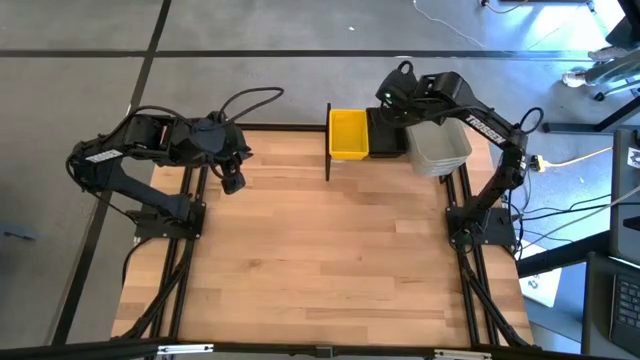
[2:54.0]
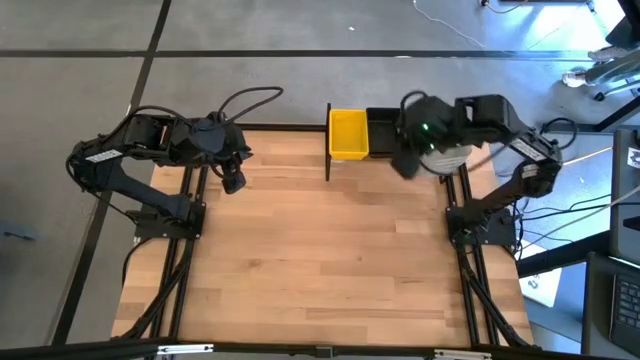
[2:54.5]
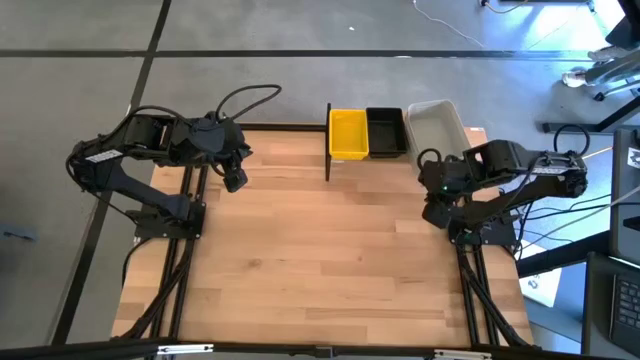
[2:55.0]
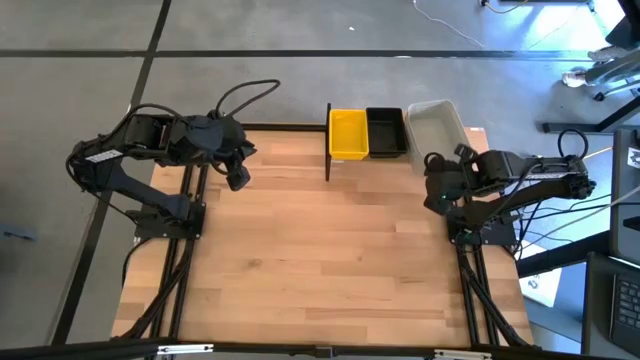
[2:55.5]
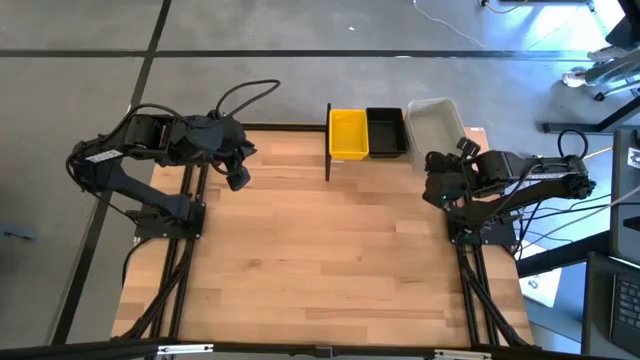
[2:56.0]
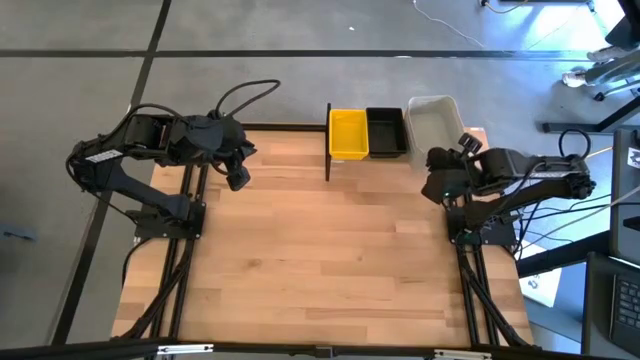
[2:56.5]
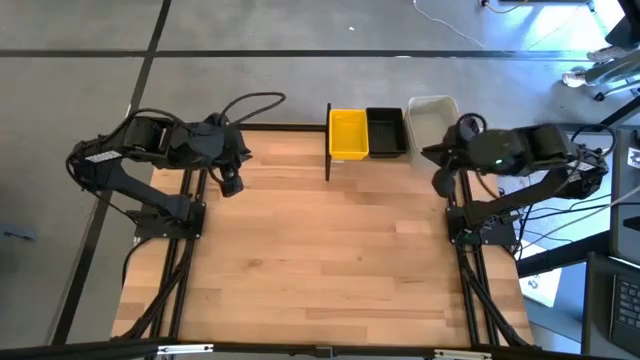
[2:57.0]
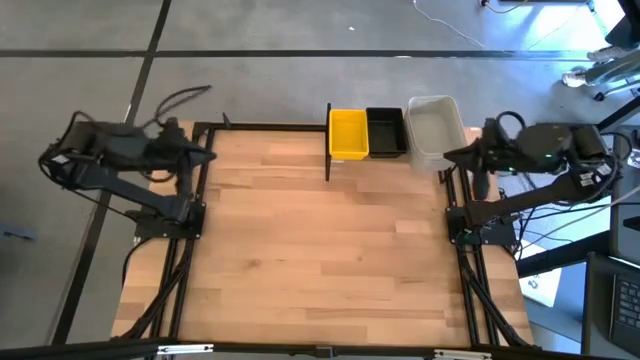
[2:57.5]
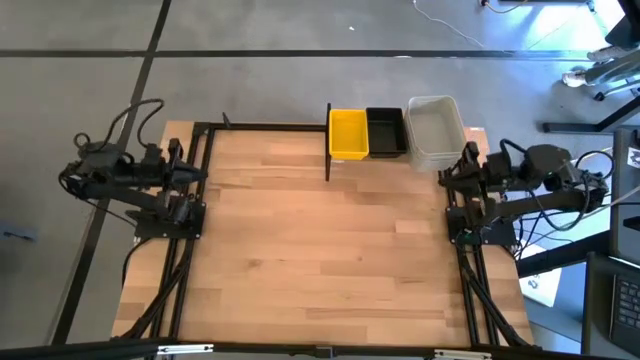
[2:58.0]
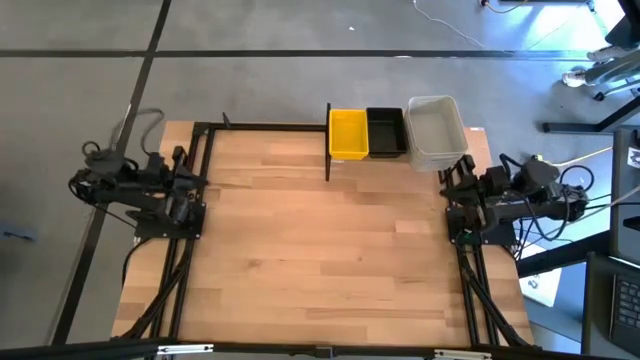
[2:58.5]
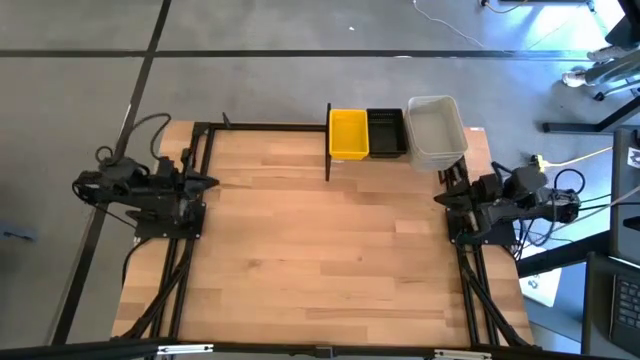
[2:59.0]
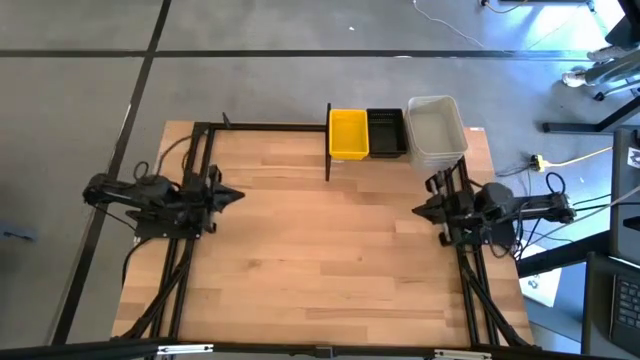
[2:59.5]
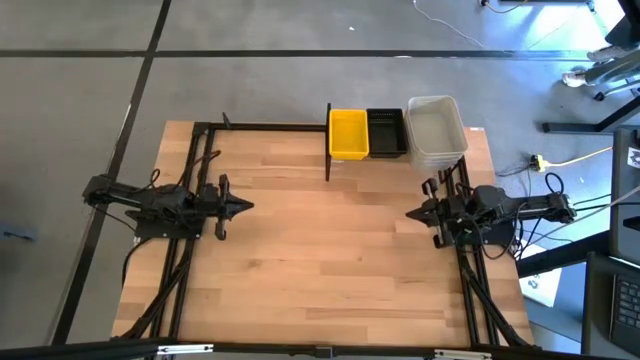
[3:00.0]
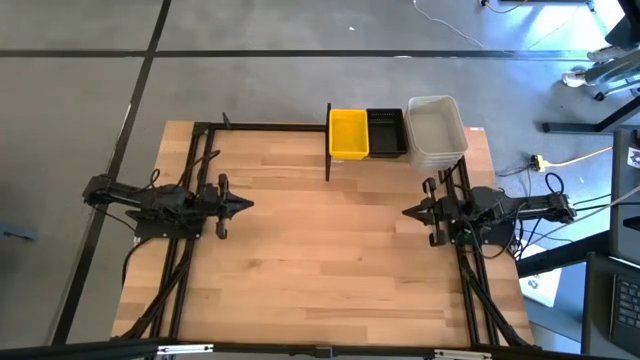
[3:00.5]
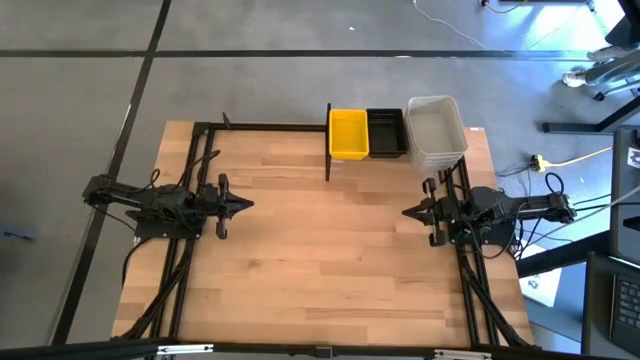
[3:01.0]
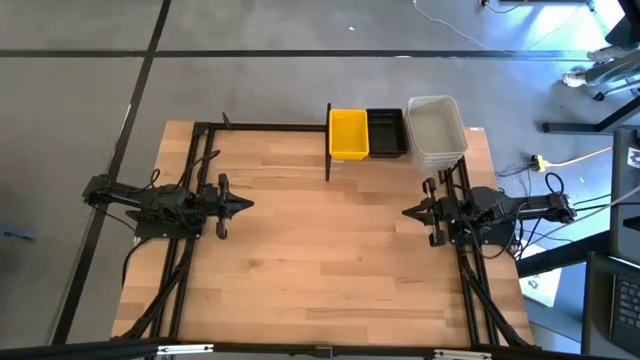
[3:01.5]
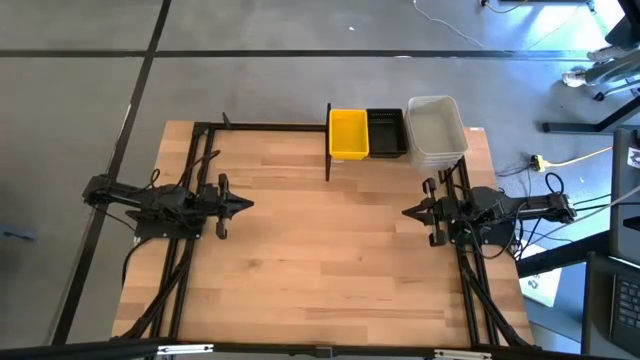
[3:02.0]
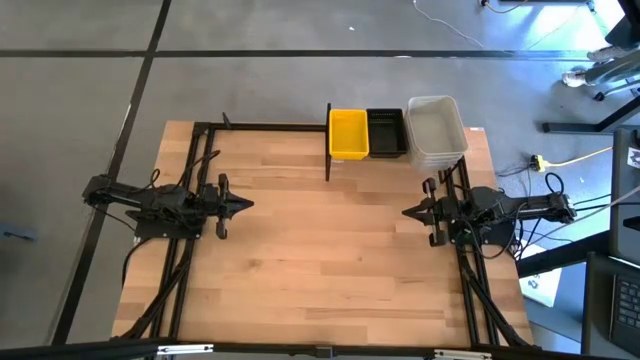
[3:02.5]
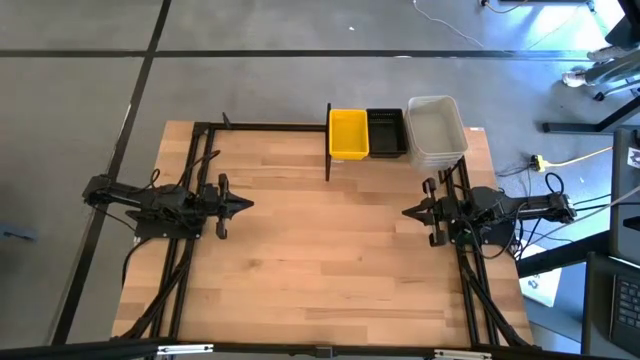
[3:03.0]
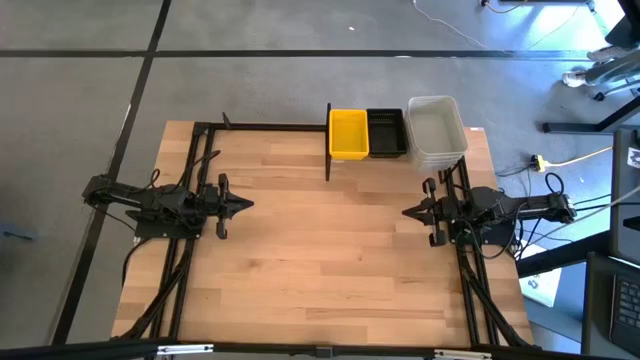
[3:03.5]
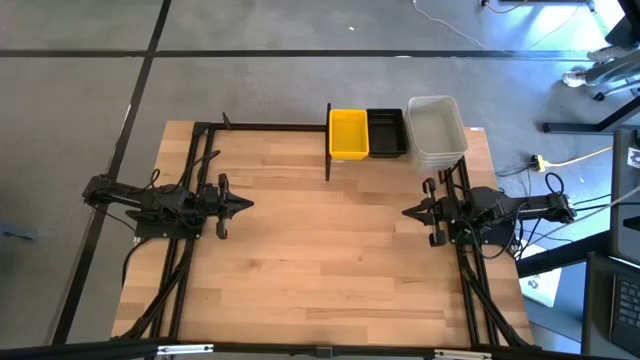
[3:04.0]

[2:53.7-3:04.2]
Task: Stack baskets on shelf by color
Return to Home Position

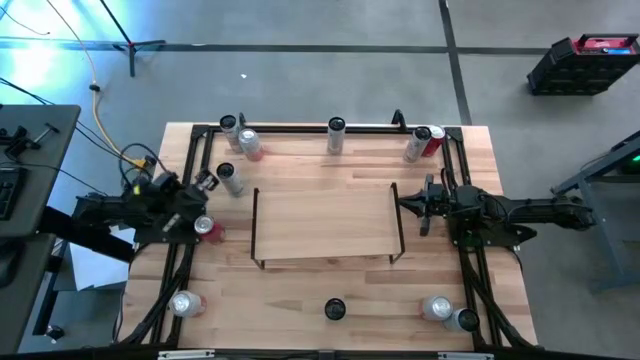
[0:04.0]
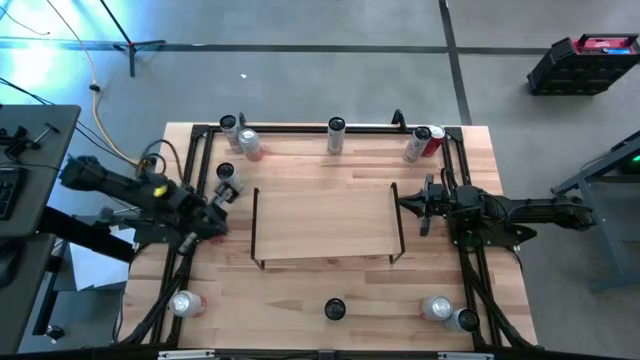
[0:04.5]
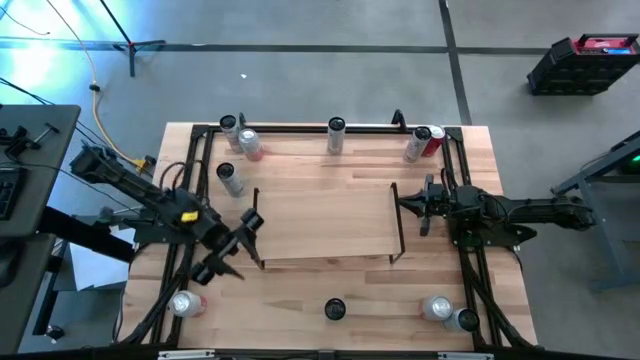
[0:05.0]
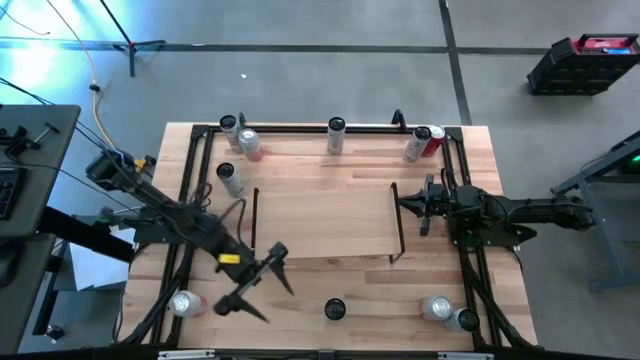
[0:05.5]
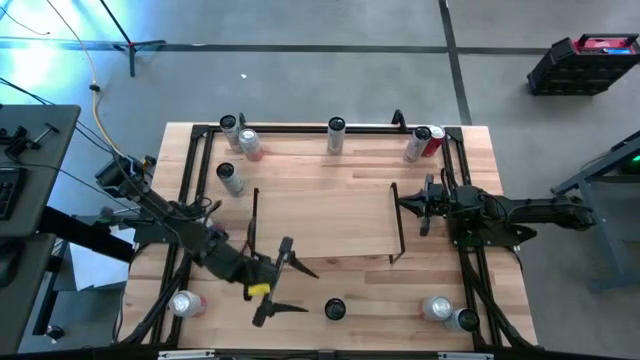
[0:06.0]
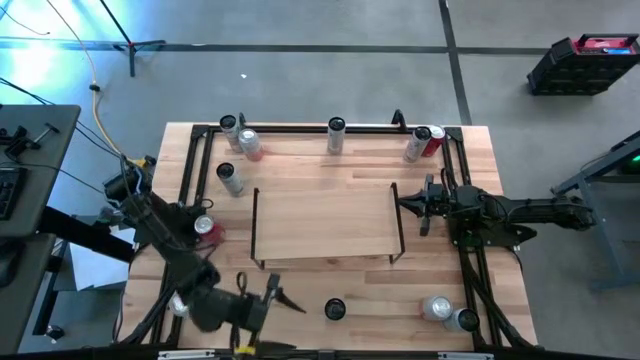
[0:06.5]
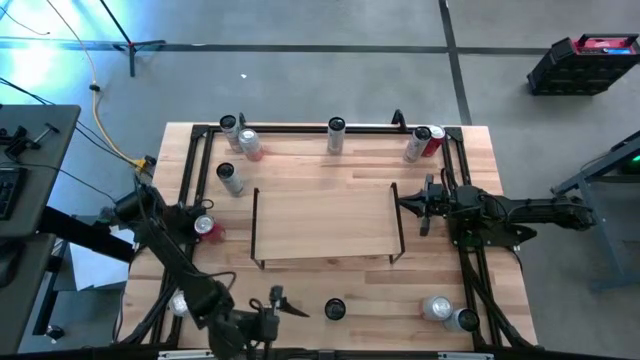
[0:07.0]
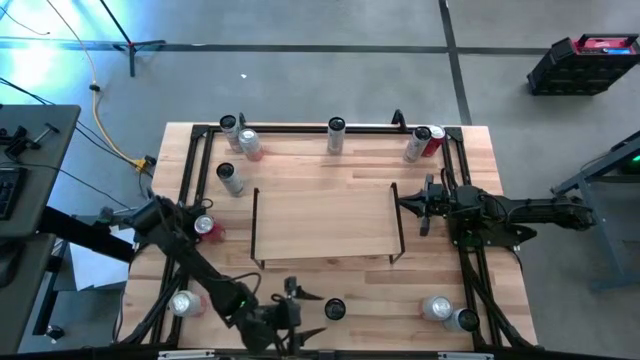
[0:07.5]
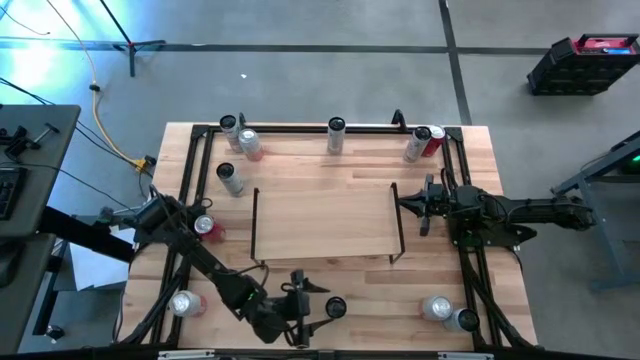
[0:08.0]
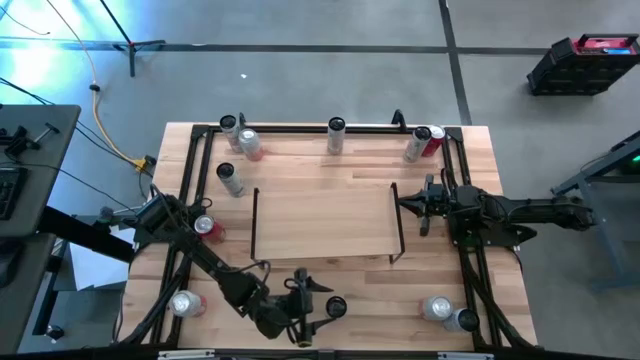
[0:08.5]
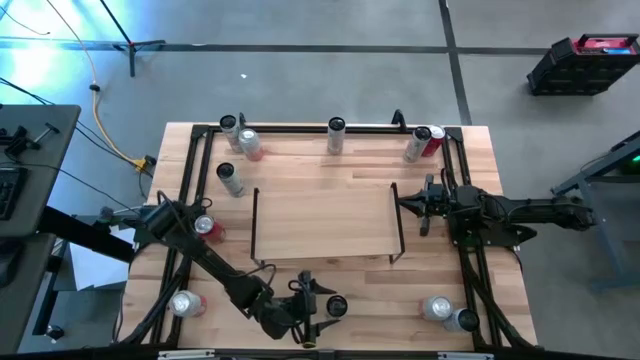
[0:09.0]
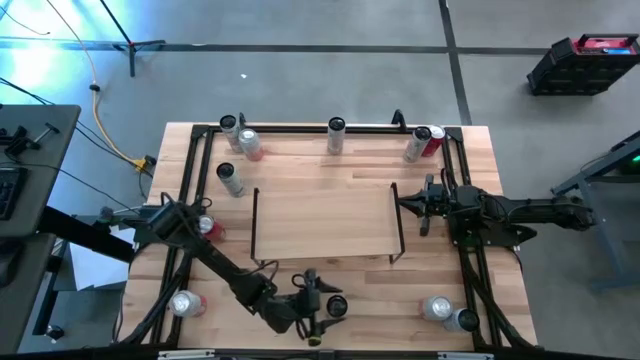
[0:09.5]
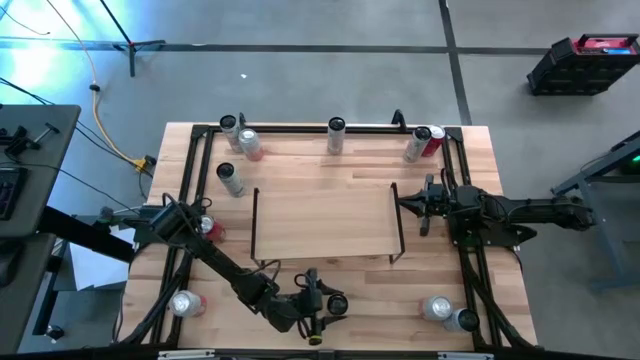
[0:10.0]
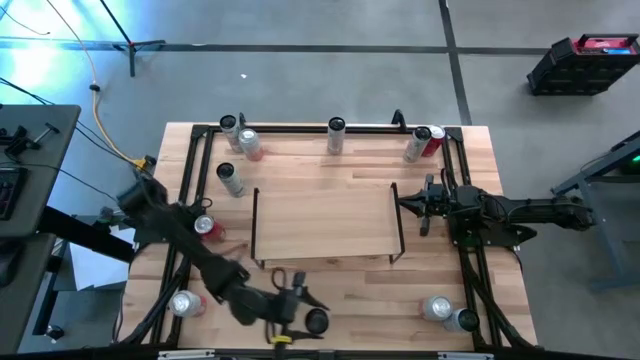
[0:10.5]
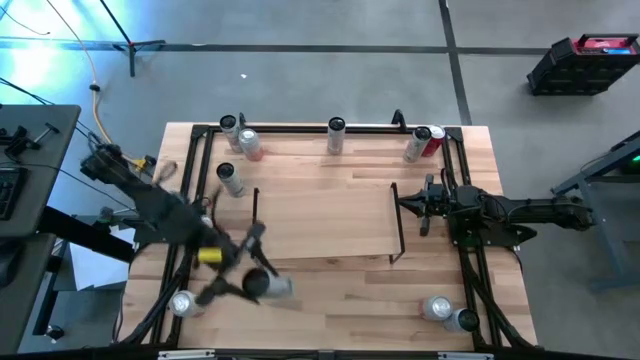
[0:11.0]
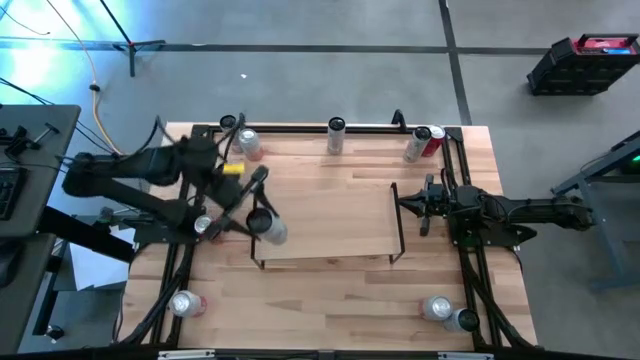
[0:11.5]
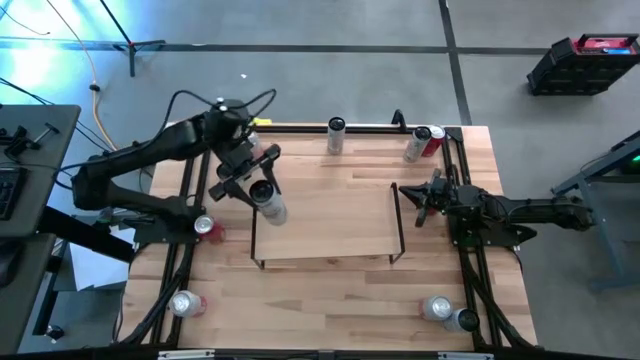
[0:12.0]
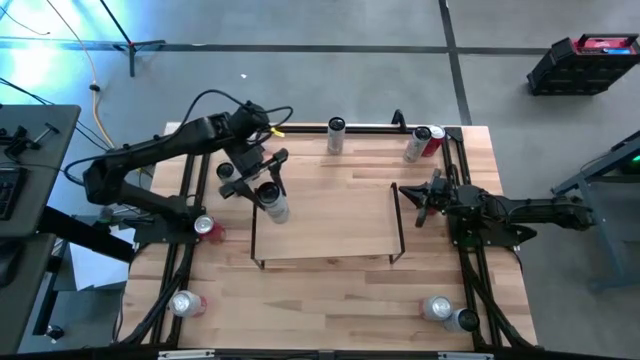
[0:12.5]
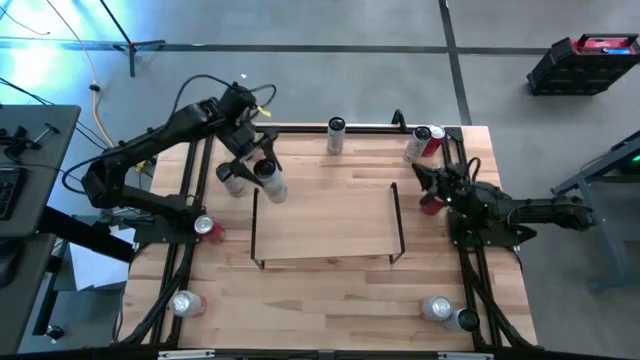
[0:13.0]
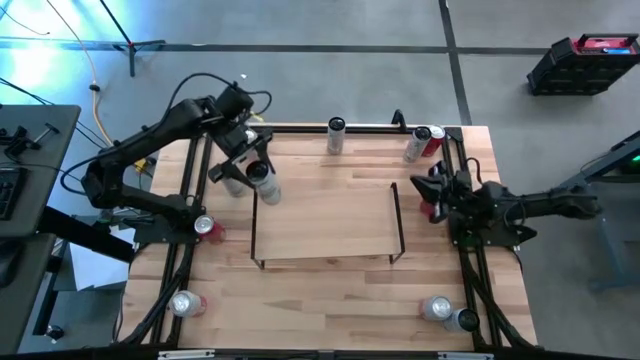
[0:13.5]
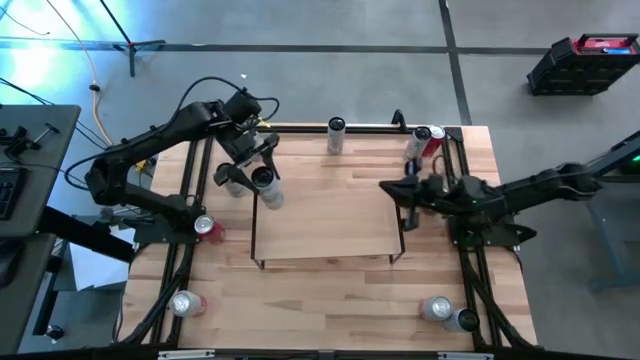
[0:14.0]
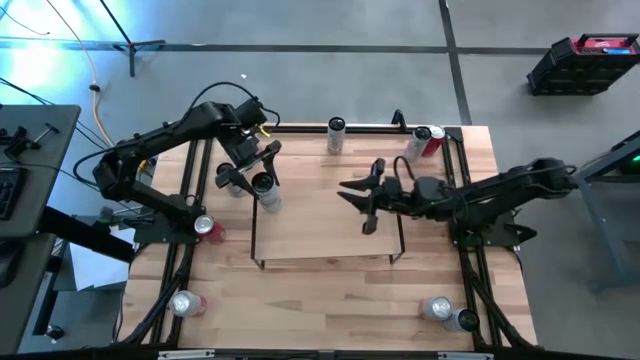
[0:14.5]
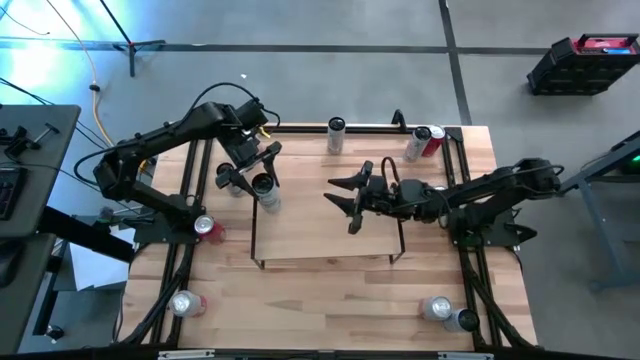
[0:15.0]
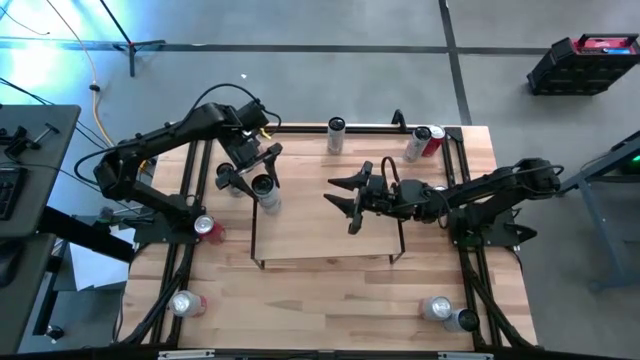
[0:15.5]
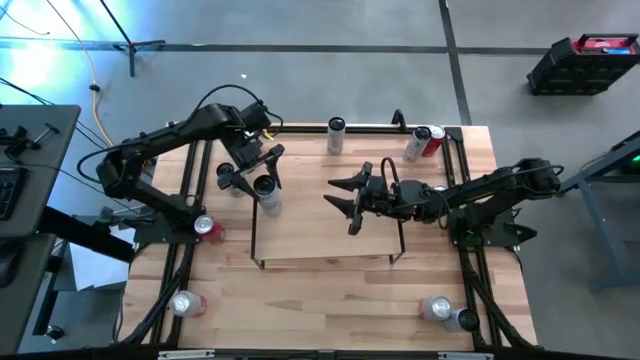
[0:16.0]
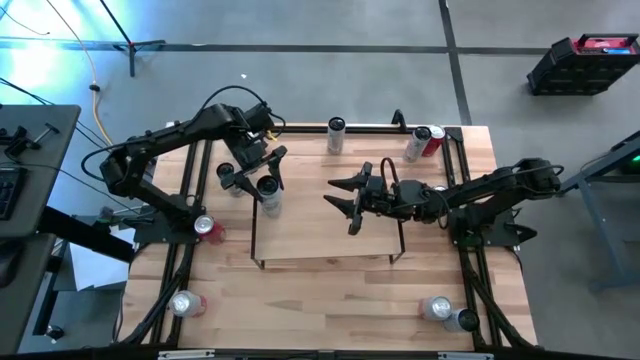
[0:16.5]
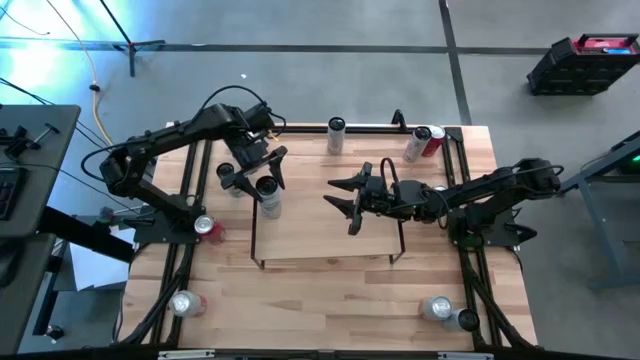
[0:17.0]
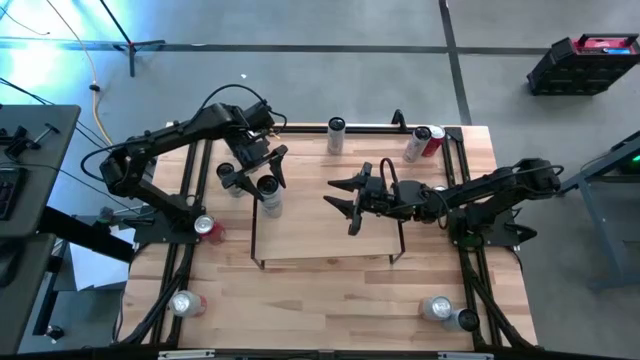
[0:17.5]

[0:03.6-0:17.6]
Task: Place canned beverage on shelf
Put the bottom left white blue soda can on the shelf
